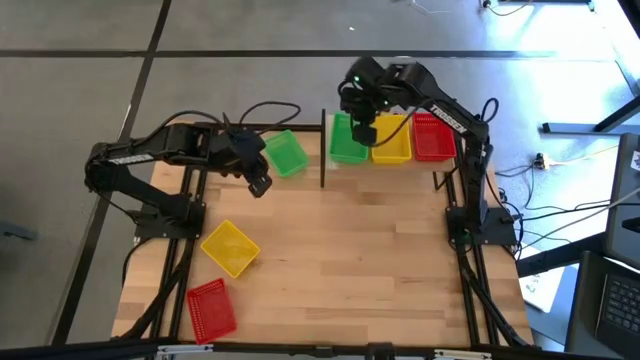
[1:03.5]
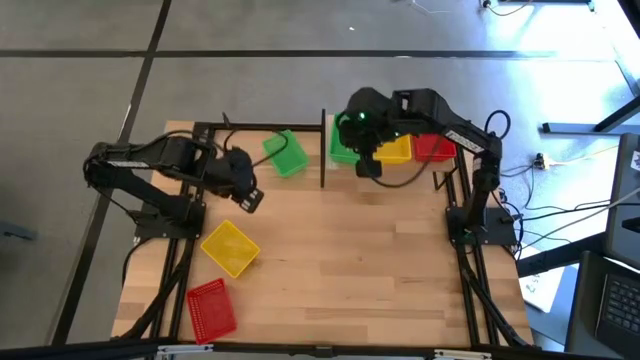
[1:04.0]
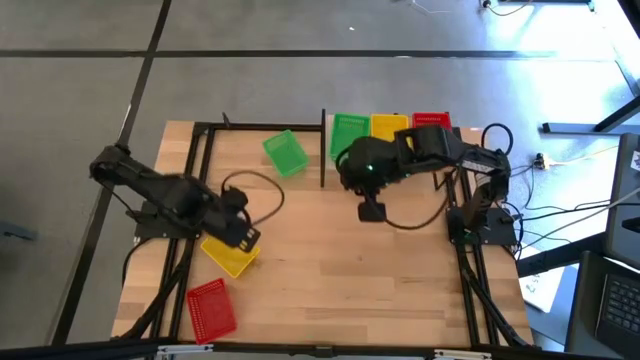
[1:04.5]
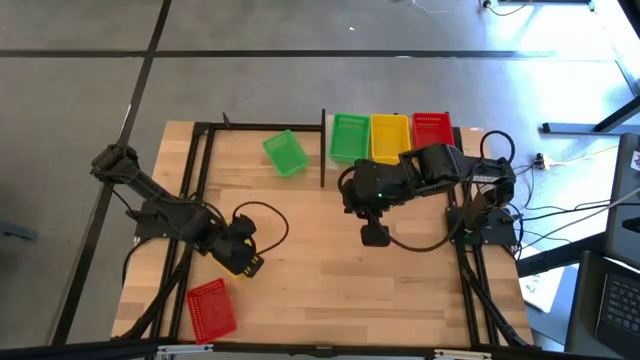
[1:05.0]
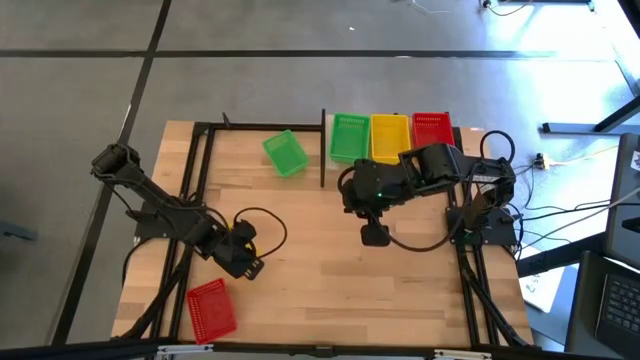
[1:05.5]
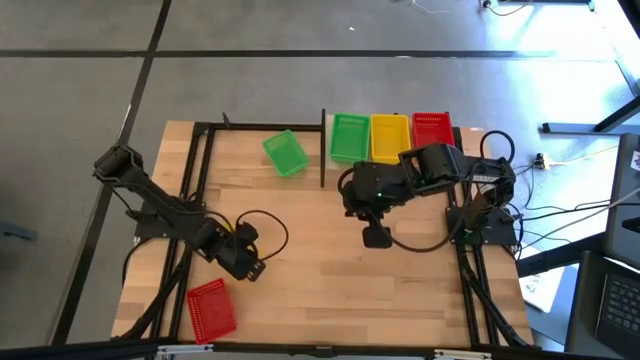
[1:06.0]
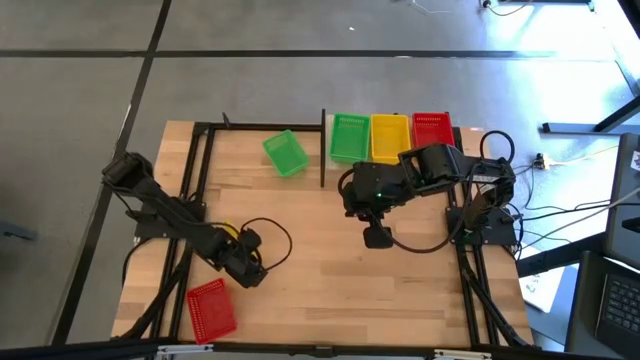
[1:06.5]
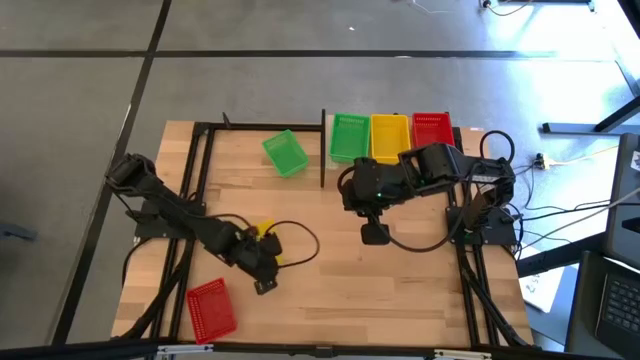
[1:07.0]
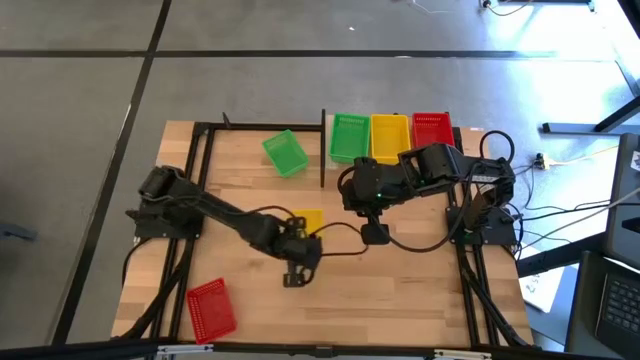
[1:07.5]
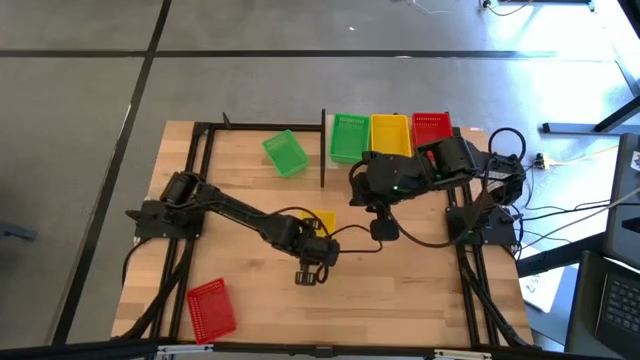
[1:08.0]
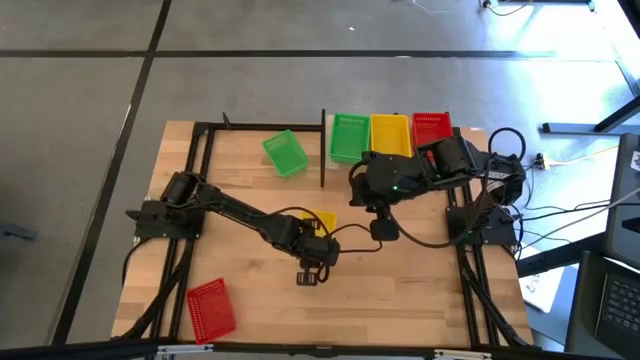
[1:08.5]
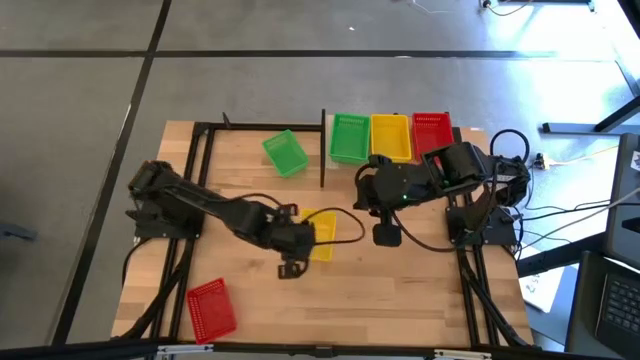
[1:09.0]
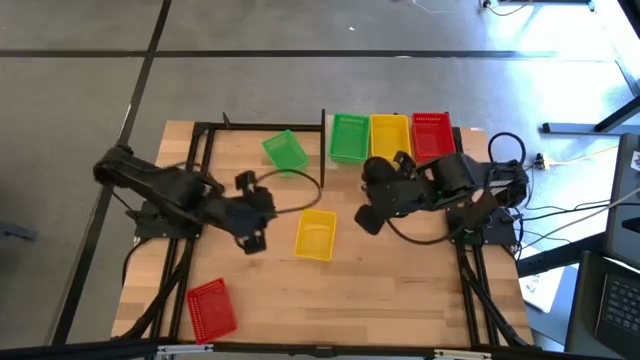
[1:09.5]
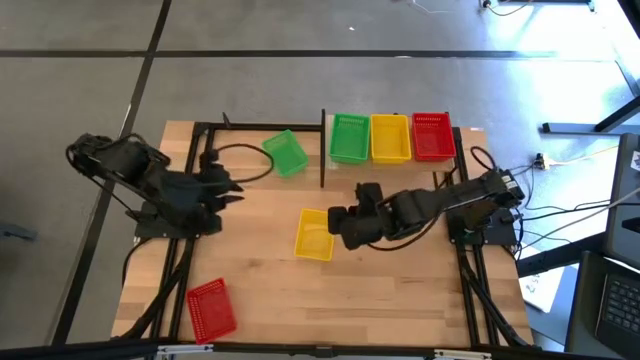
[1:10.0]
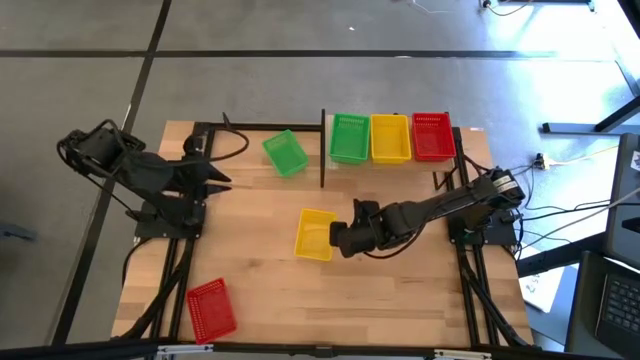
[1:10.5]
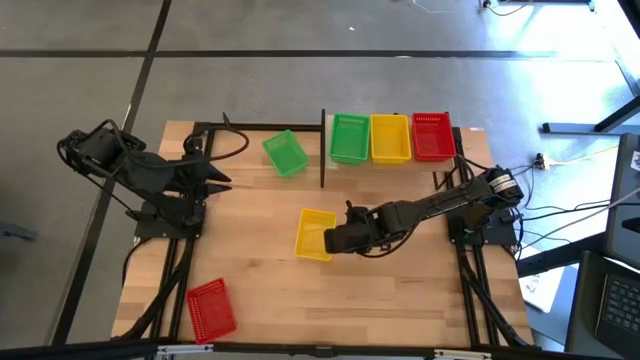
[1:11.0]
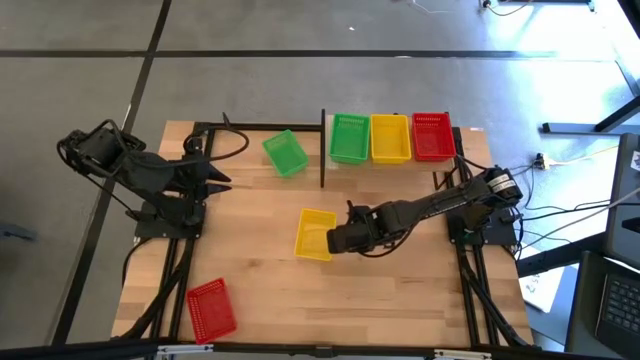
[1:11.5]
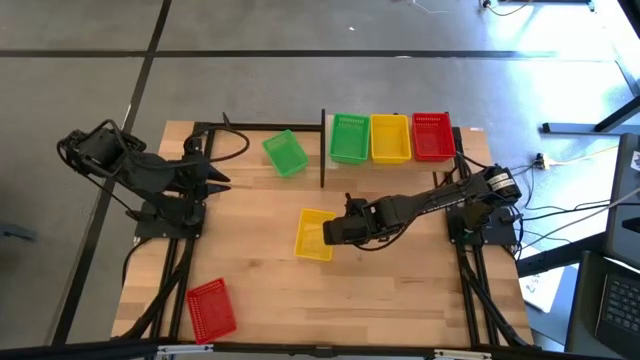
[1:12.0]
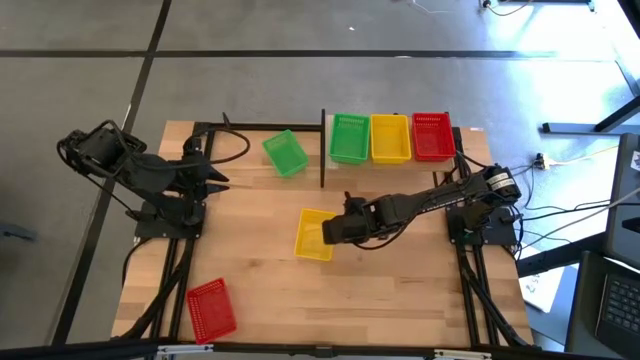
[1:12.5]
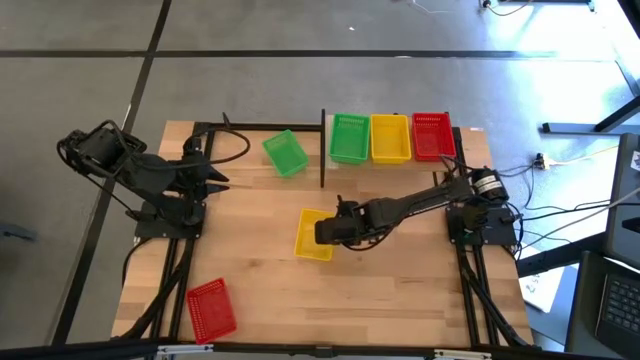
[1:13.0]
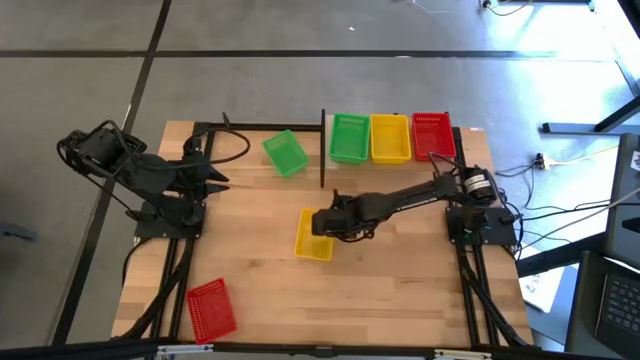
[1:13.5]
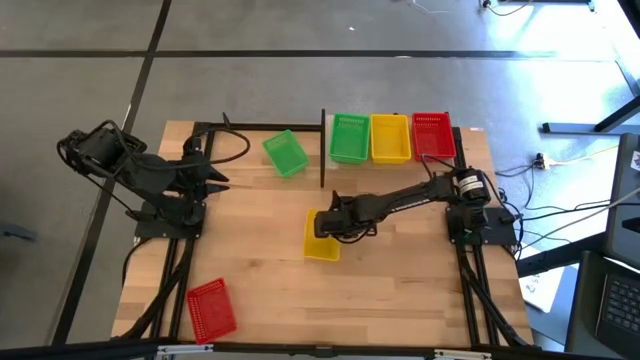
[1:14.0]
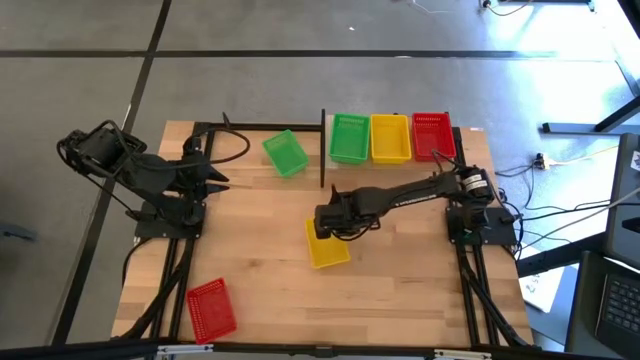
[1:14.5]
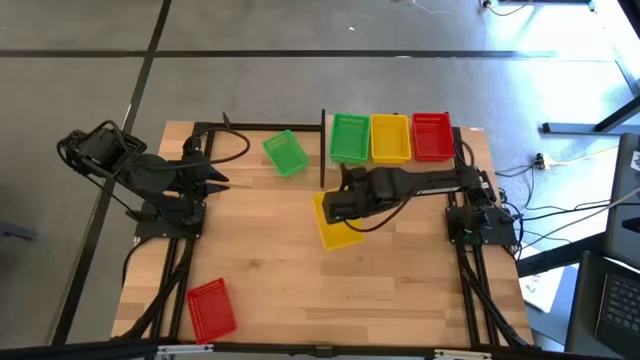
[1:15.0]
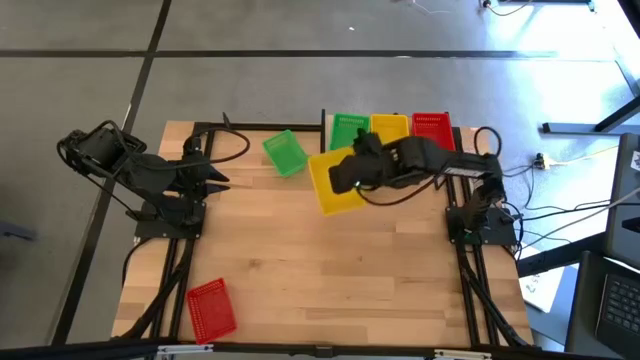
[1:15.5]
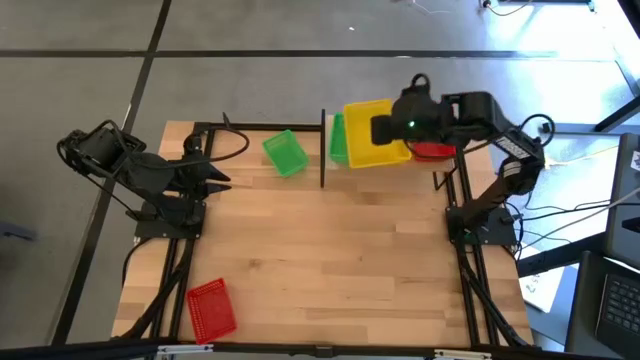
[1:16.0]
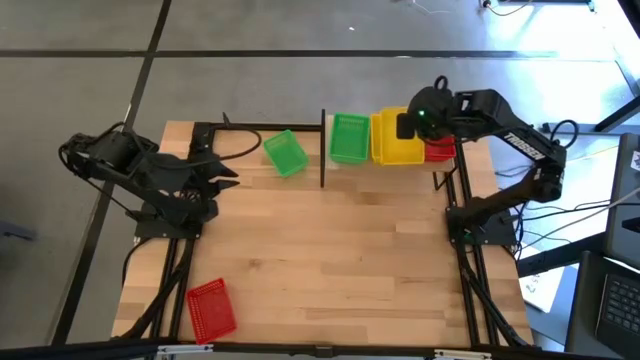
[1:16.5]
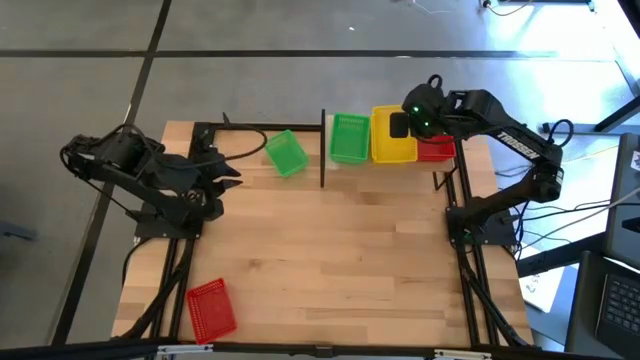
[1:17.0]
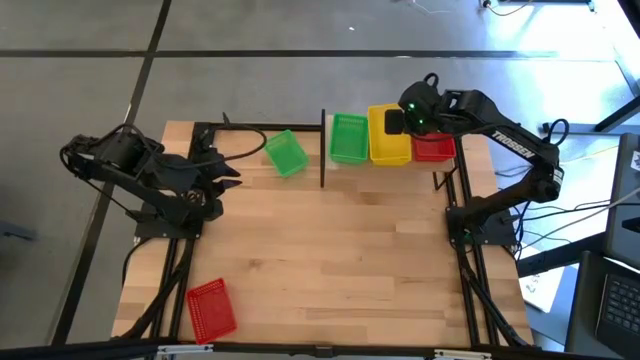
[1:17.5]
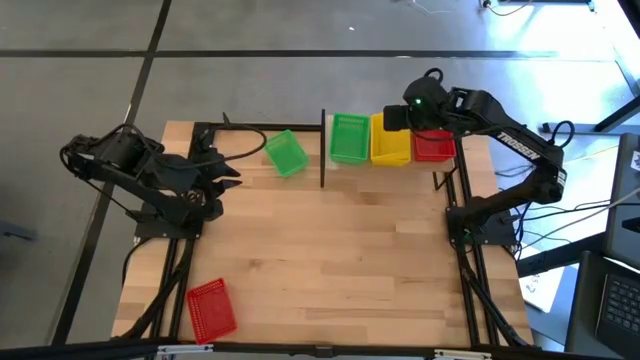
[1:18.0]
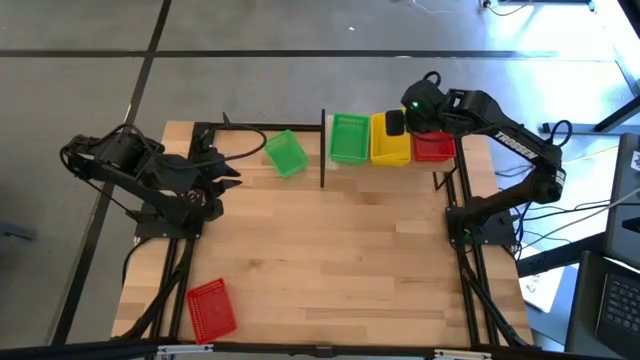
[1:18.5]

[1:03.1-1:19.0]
Task: Stack baskets on shelf by color
Stack the yellow bin on the yellow bins on the shelf

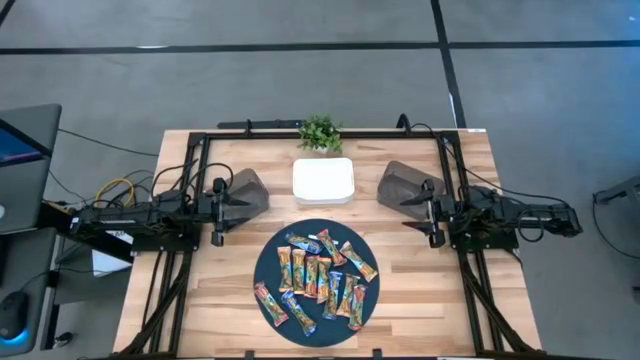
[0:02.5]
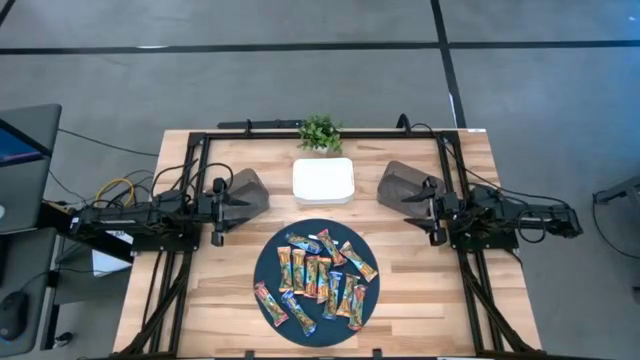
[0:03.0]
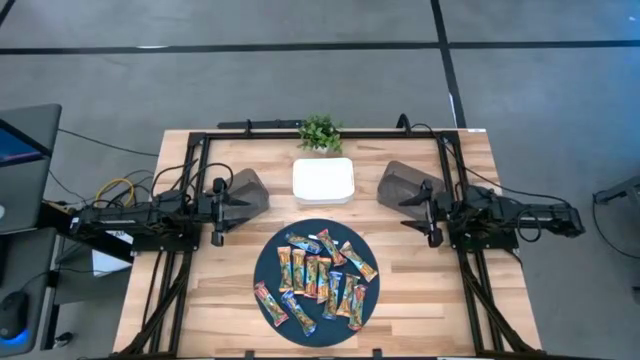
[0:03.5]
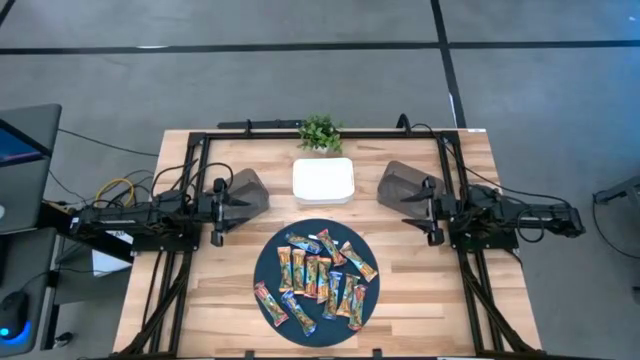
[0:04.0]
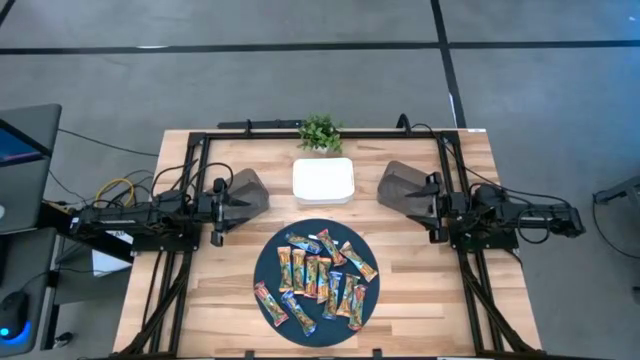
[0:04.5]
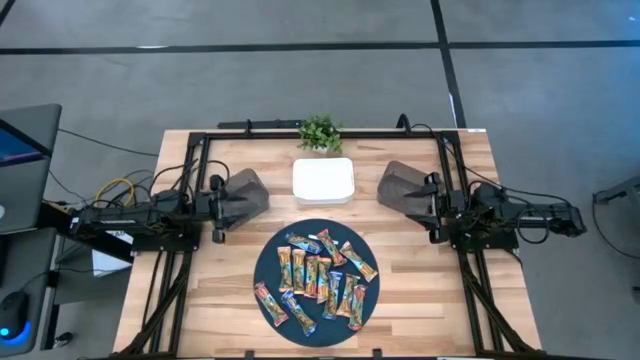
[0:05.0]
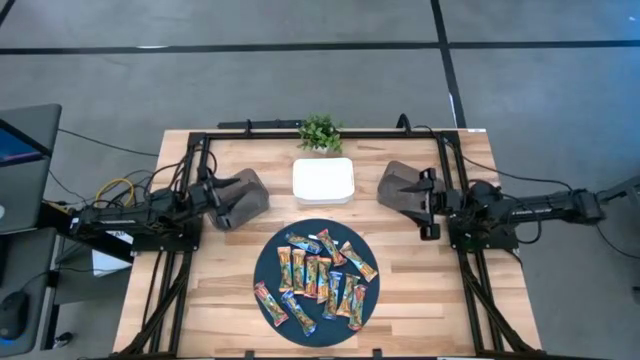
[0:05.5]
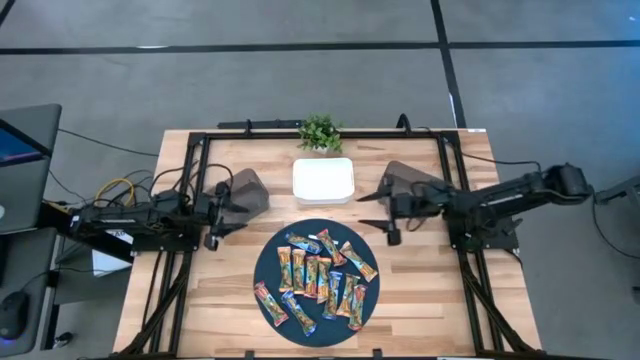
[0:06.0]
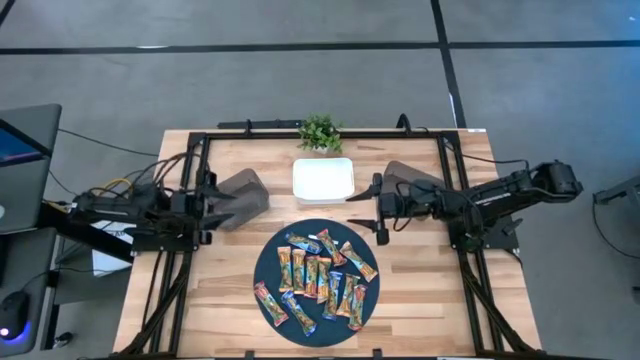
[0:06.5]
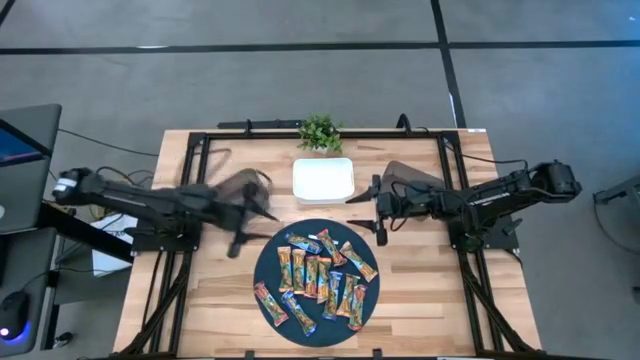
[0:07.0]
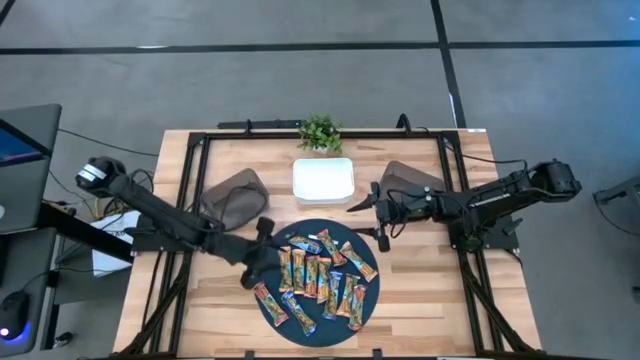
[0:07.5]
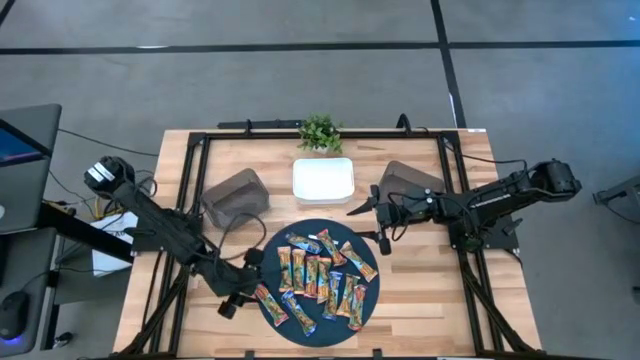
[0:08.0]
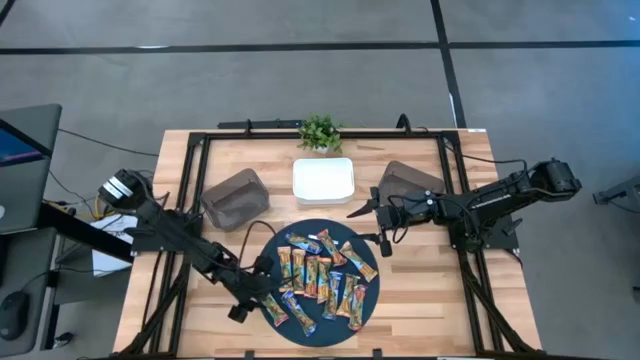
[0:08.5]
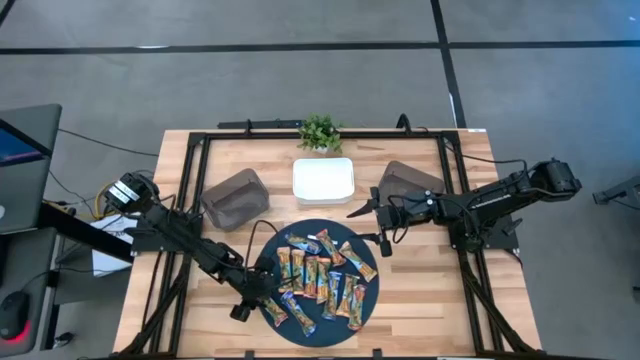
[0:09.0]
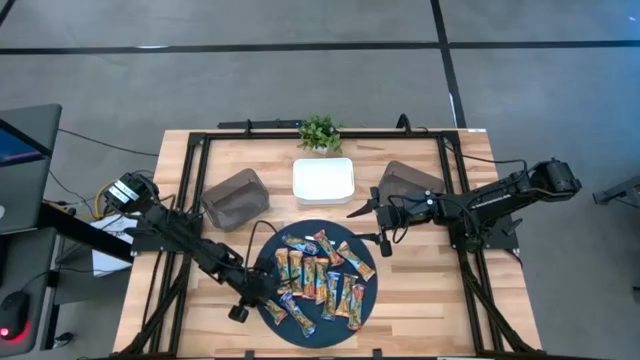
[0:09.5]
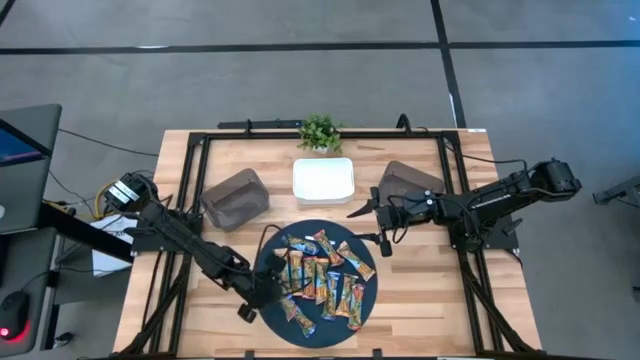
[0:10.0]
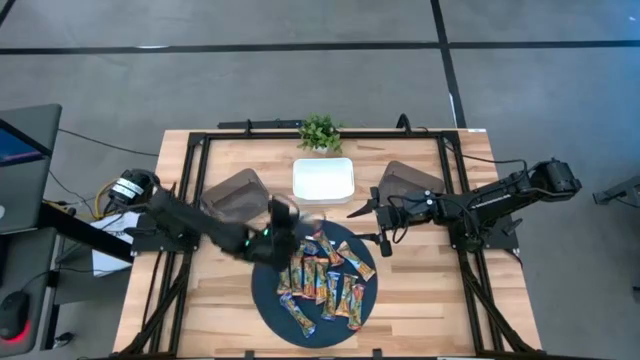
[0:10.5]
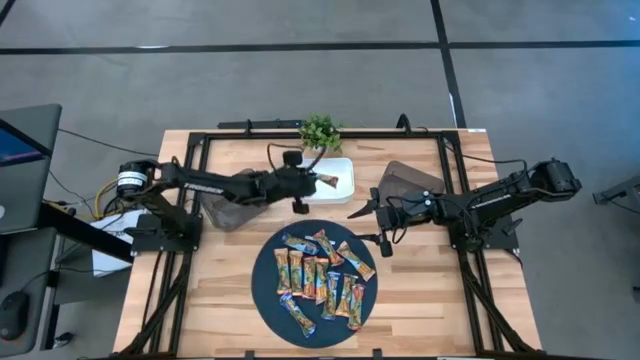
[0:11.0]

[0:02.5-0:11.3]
Task: Pick and place Granola Bars by type
Put the red granola bar into the white bin
